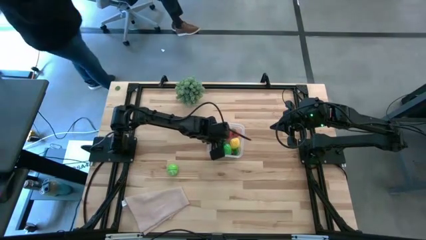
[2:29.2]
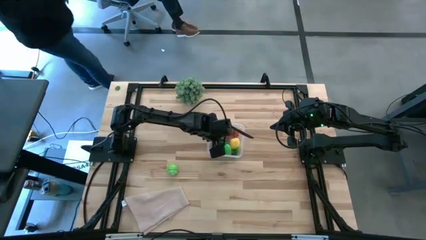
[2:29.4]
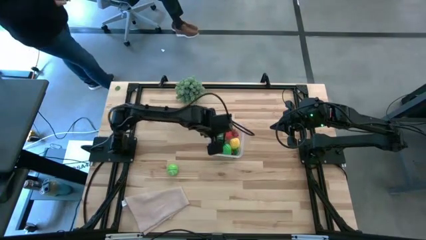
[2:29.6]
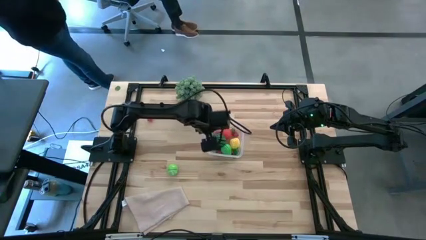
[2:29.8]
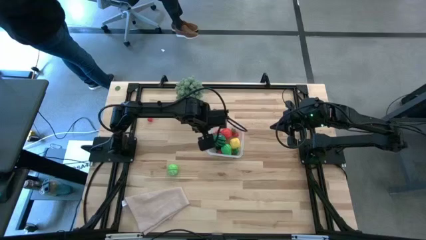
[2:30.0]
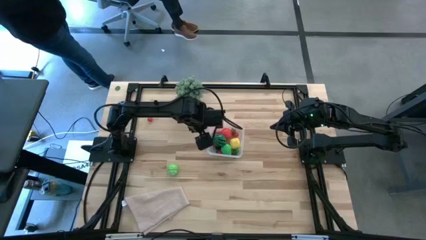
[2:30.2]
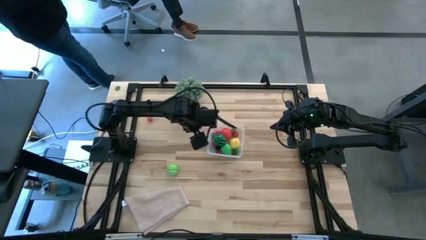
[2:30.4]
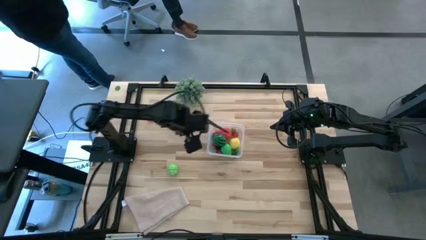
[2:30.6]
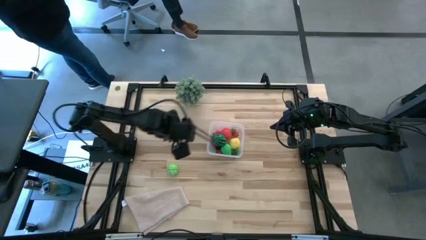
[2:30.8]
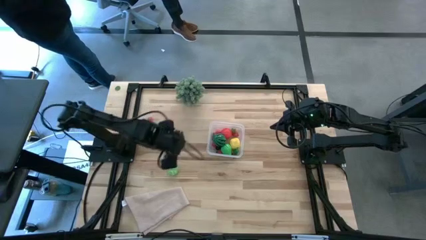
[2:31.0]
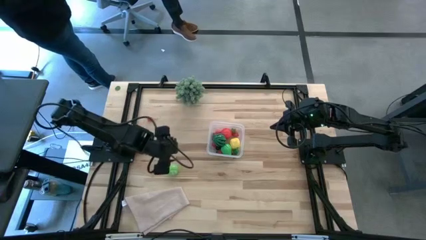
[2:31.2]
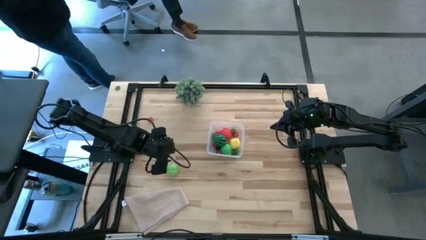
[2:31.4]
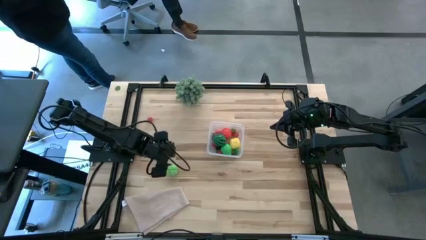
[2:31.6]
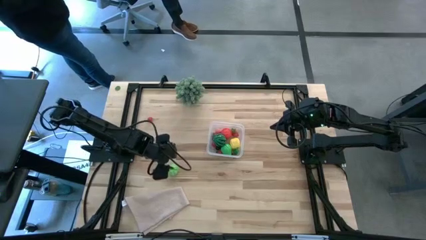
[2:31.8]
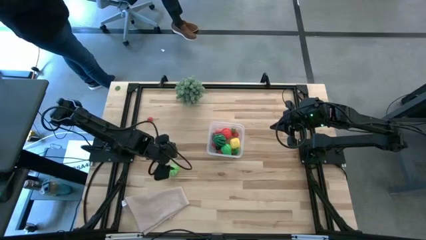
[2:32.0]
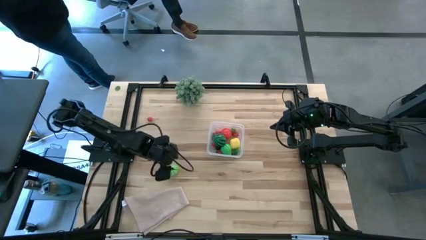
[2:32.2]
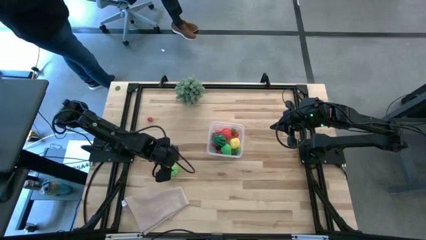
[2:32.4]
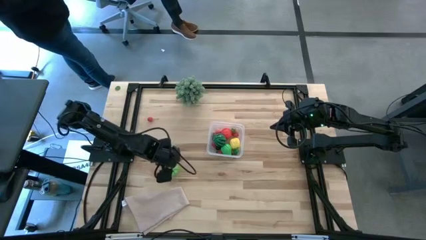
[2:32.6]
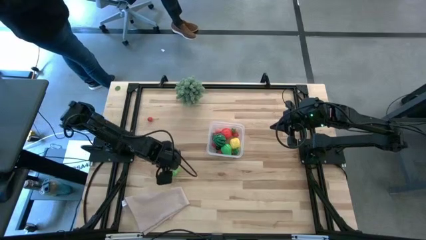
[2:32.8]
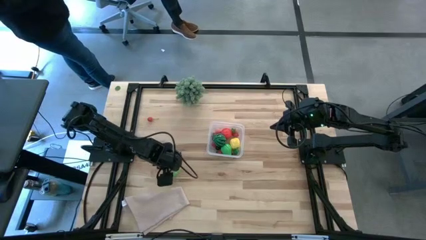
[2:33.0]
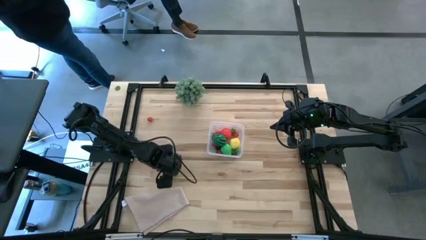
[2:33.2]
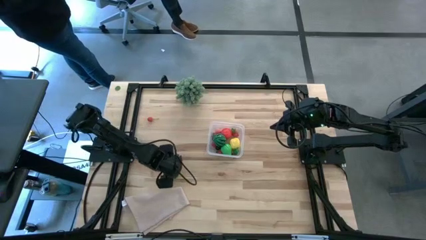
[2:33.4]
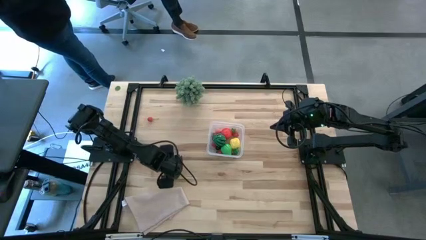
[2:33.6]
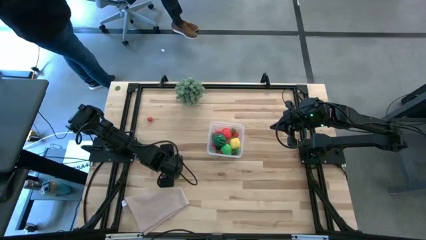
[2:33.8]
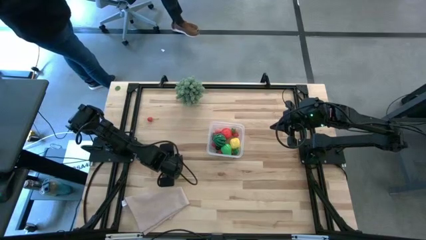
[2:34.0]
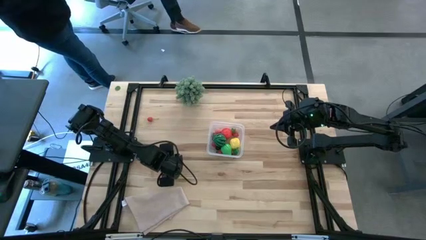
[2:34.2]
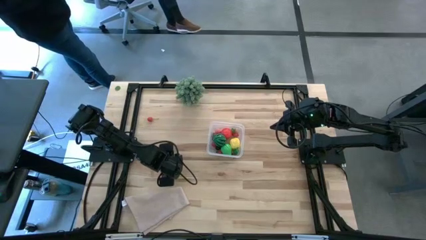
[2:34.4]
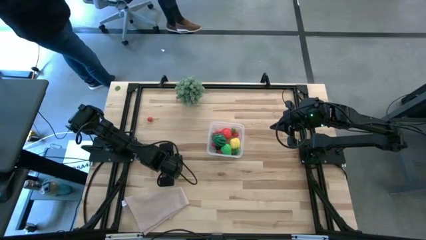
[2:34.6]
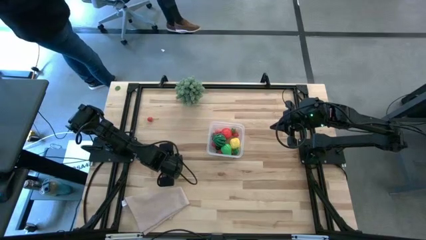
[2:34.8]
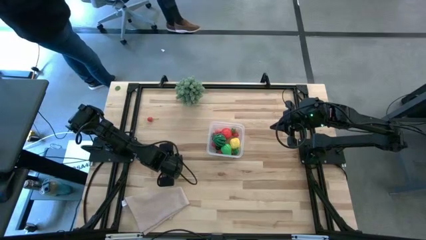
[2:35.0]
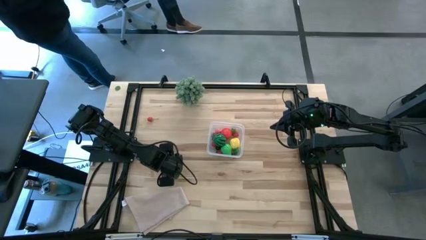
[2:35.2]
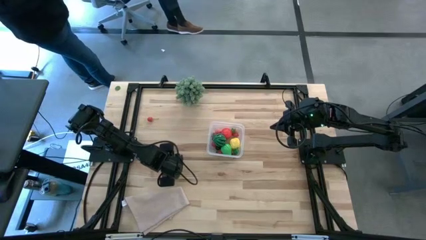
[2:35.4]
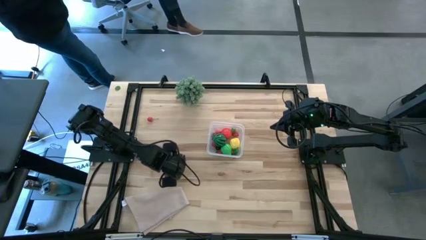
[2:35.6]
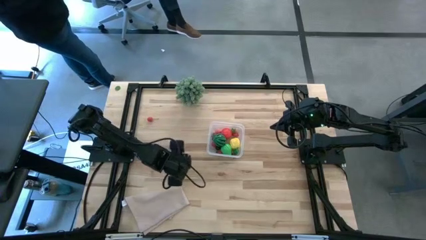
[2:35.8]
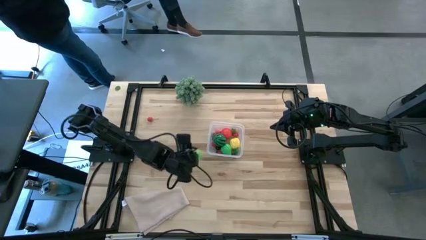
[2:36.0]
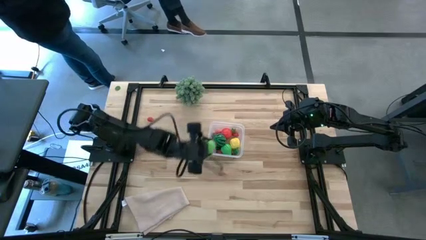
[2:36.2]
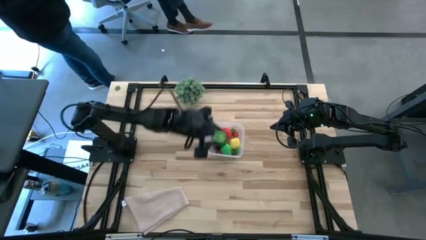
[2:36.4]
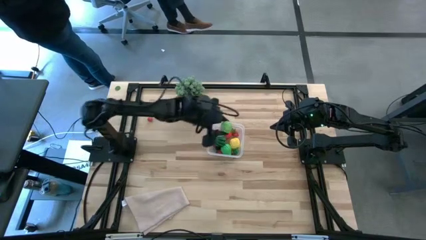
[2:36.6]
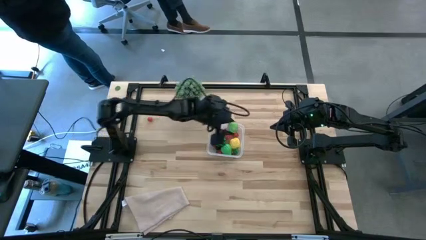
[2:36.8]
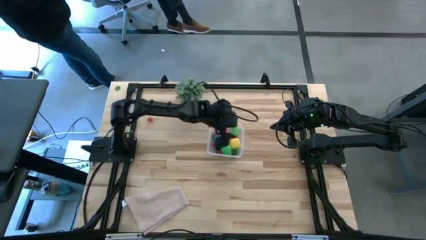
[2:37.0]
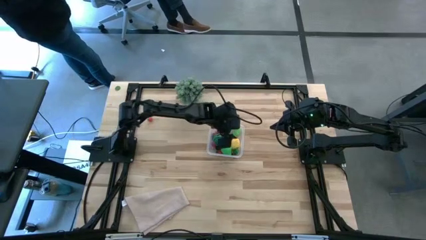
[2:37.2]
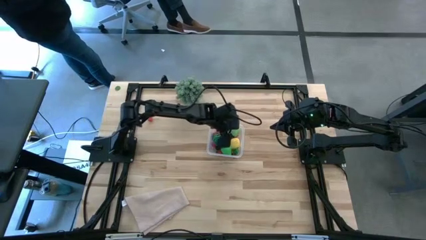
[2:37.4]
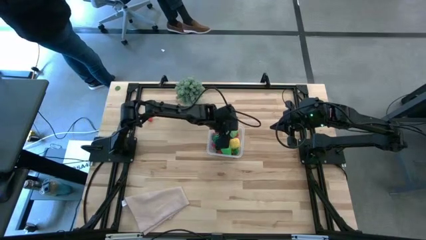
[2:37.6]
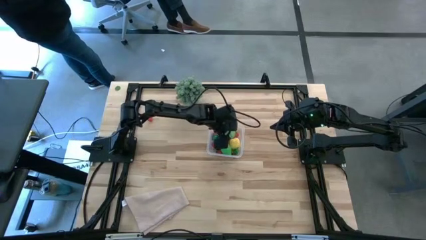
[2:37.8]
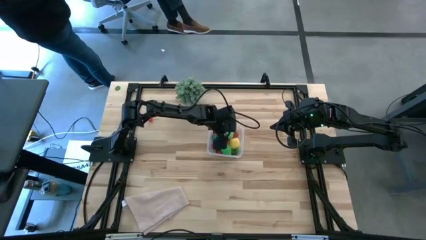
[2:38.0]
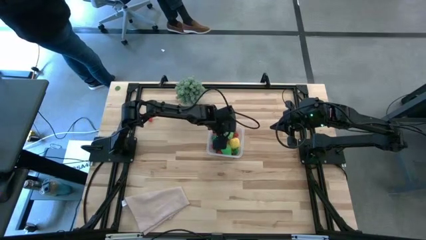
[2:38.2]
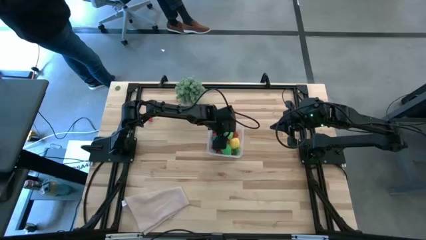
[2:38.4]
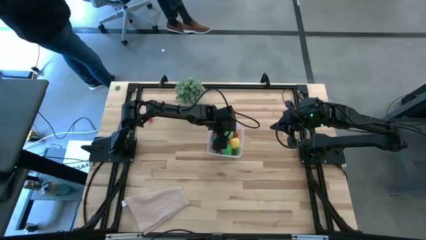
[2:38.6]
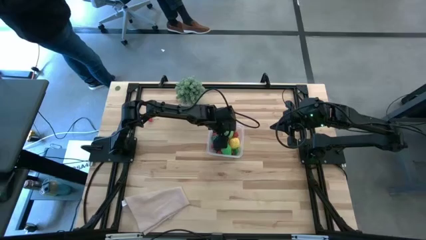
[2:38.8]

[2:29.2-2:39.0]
Task: Pick and placing Produce into tupperware
Put the green cabbage into the transparent bin

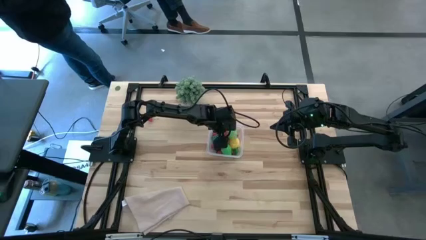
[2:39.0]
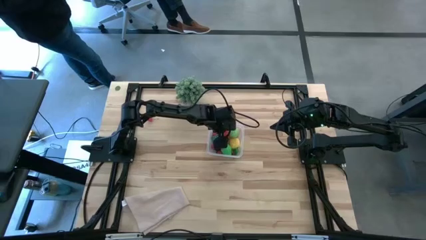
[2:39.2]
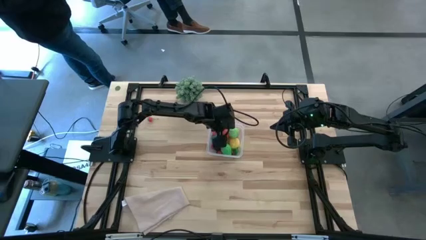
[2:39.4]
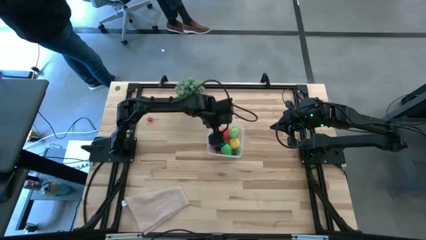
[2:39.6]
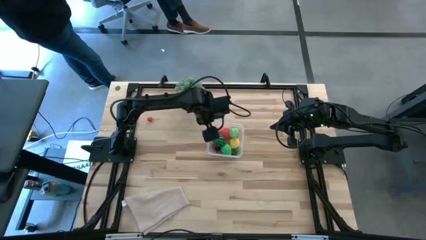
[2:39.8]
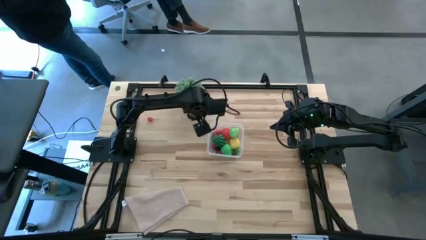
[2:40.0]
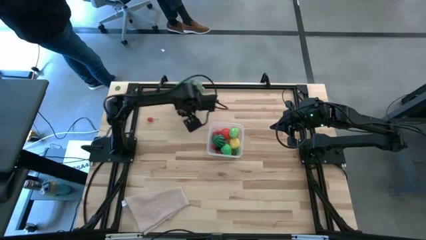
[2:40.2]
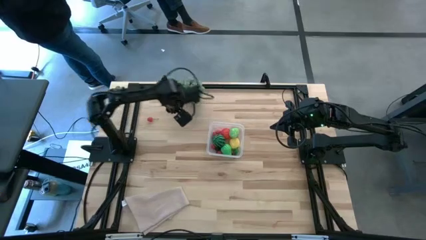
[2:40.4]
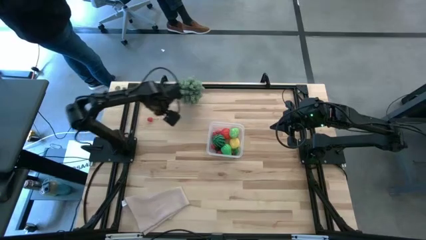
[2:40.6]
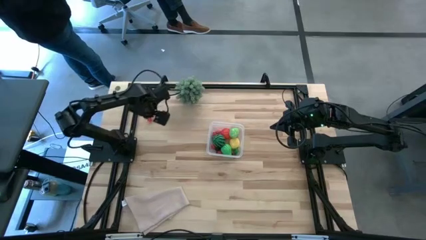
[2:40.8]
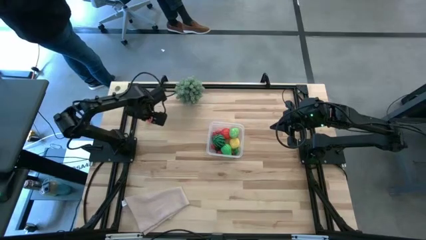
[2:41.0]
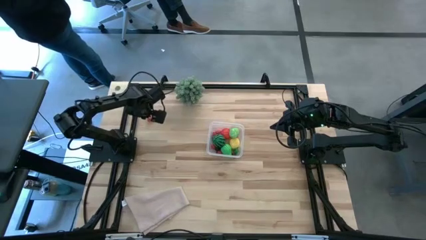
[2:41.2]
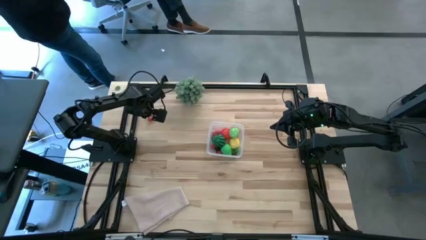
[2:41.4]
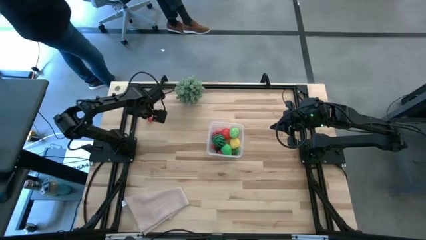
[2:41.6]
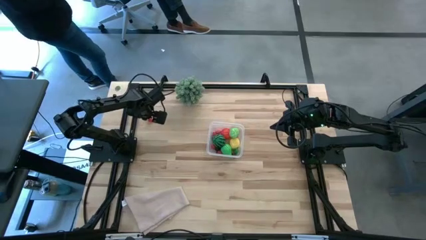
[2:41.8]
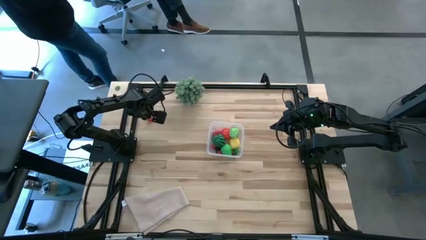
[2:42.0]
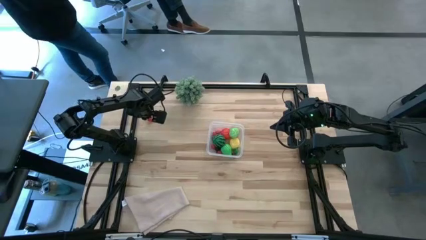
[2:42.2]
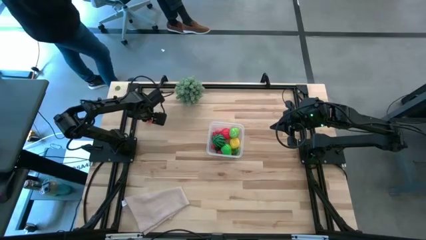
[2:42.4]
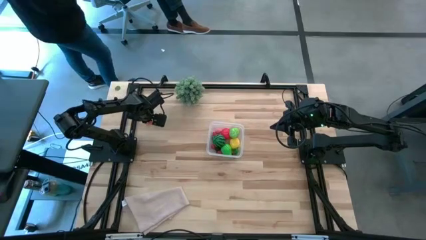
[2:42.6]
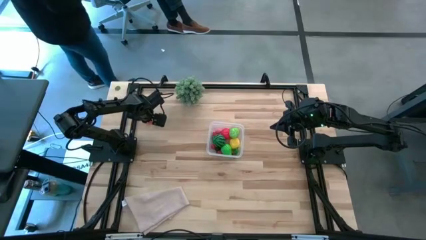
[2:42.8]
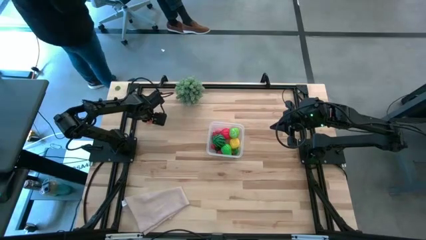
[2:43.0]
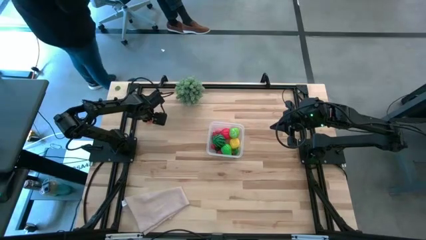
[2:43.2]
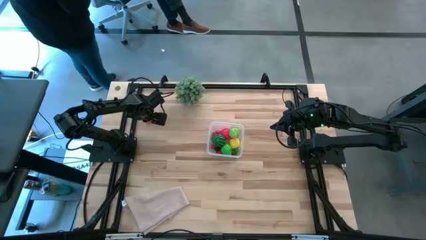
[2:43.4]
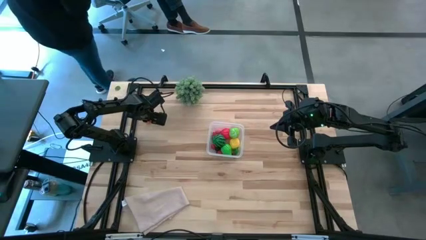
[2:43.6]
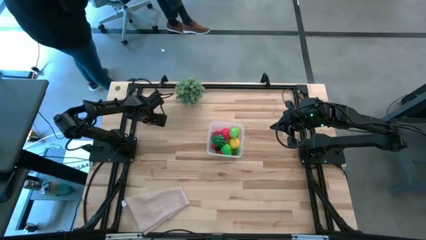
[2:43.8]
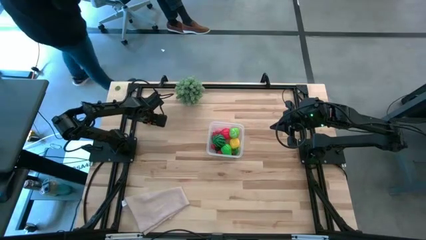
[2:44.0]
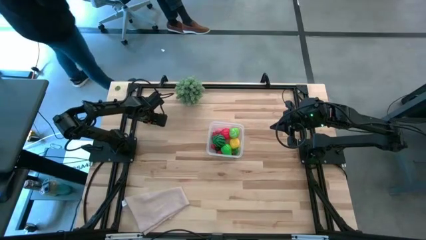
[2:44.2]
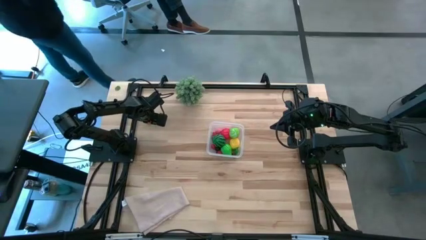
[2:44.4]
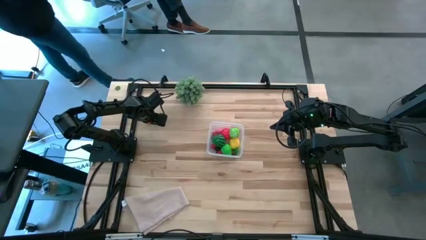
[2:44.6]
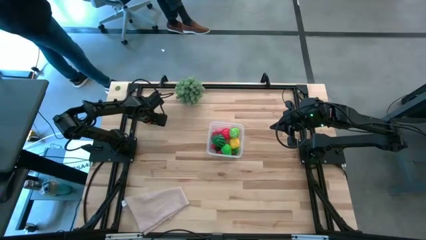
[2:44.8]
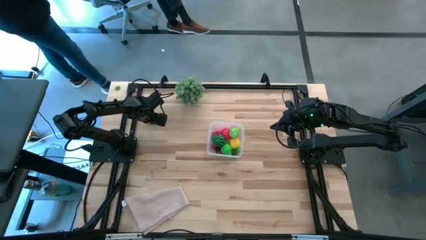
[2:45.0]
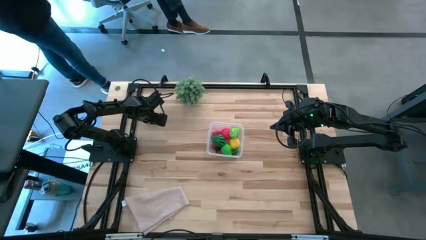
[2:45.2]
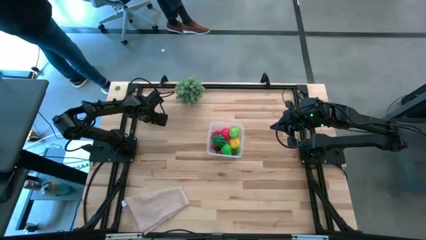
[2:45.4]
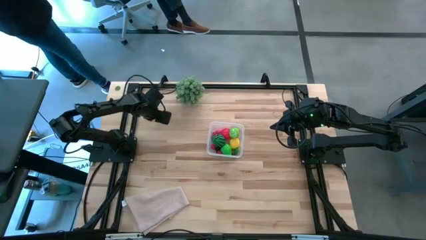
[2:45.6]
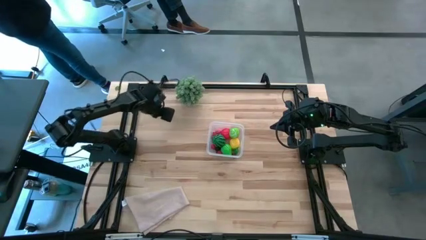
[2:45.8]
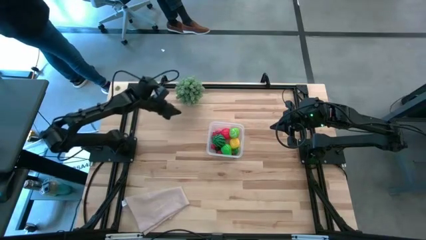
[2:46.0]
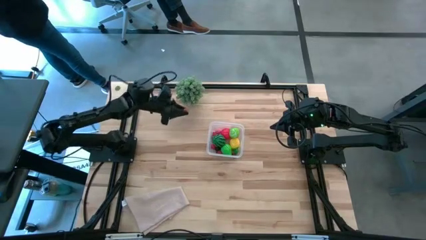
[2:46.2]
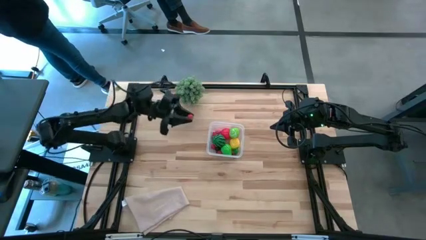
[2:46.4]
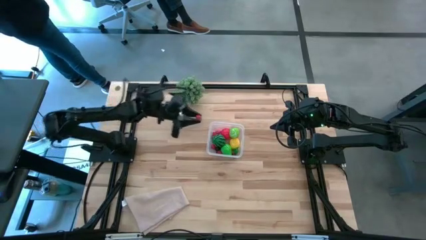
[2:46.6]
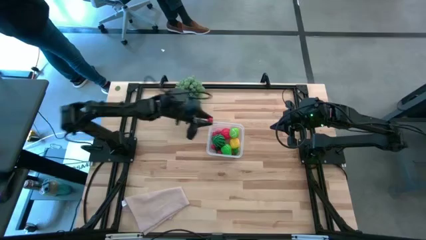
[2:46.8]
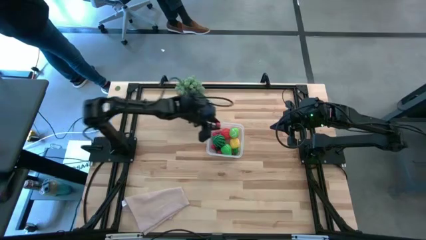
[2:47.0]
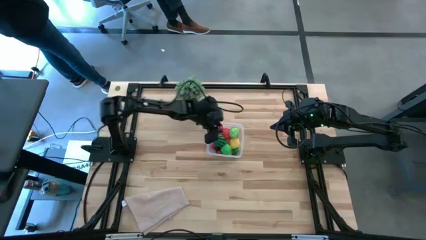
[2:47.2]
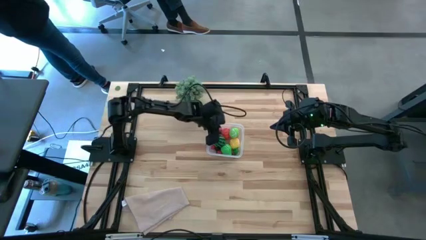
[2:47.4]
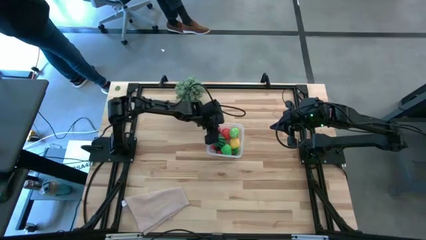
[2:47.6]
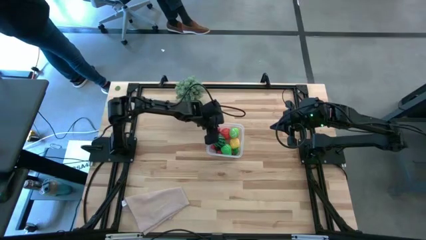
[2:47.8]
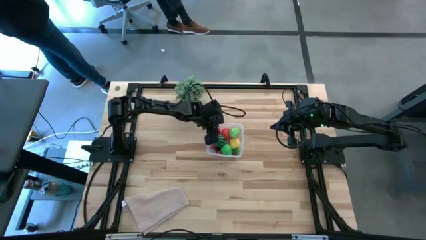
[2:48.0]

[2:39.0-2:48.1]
Put the red cherry into the transparent bin
